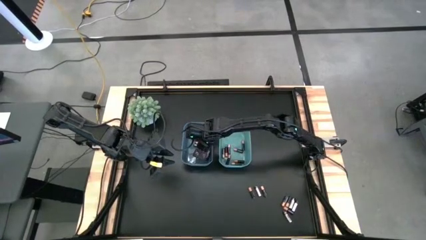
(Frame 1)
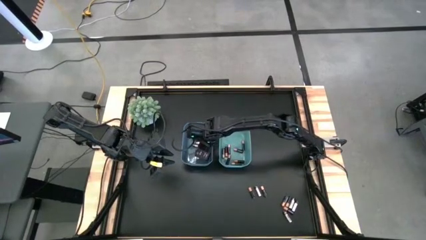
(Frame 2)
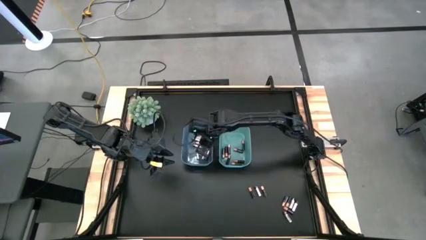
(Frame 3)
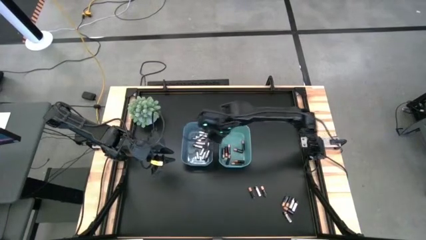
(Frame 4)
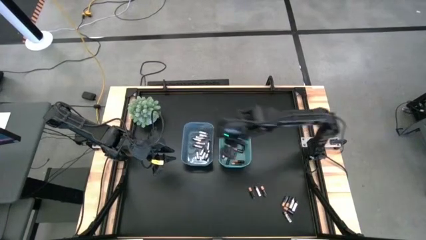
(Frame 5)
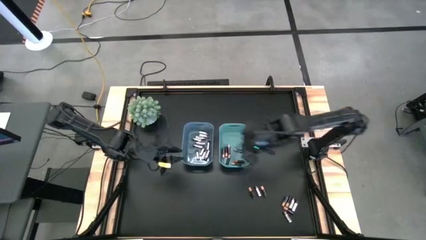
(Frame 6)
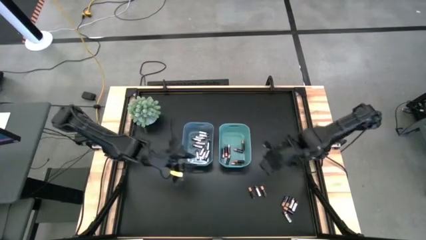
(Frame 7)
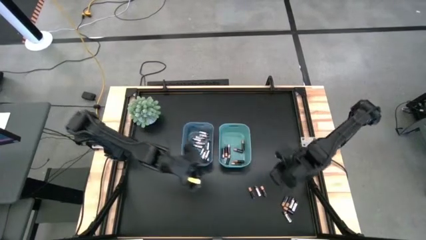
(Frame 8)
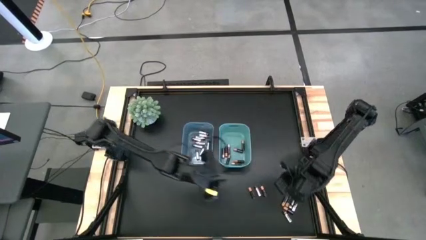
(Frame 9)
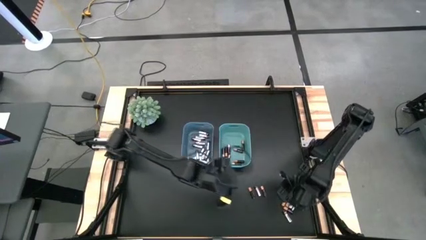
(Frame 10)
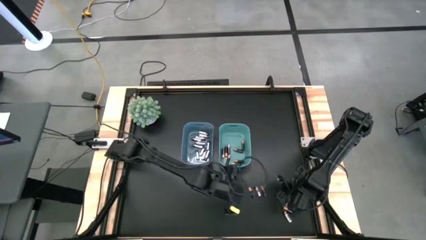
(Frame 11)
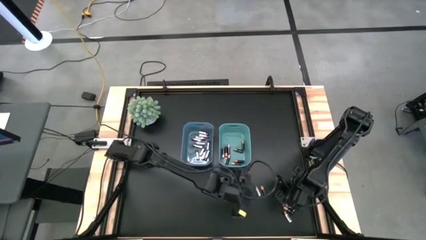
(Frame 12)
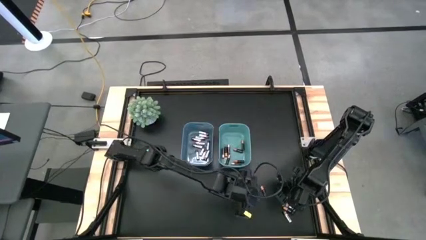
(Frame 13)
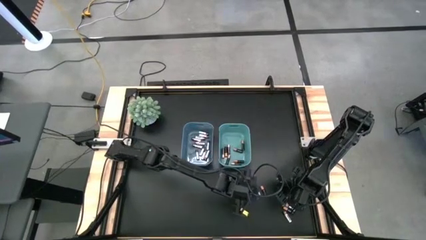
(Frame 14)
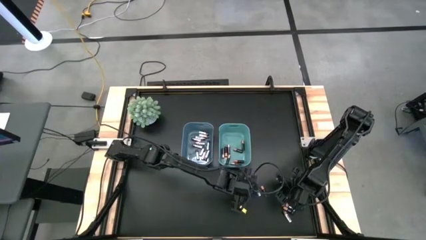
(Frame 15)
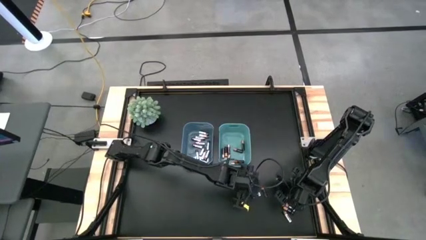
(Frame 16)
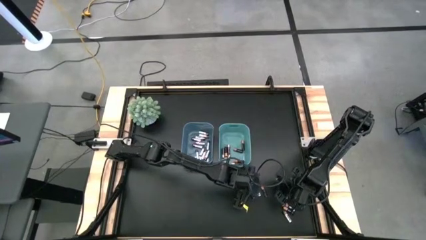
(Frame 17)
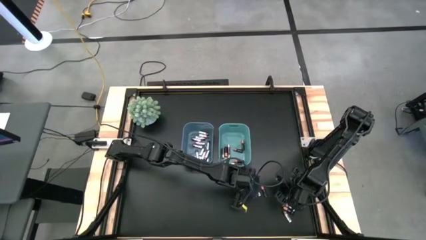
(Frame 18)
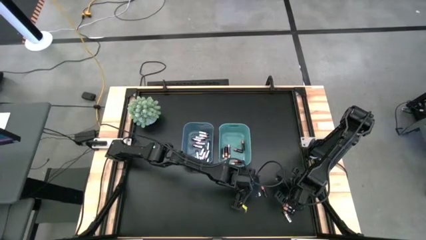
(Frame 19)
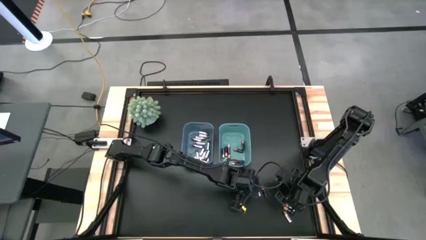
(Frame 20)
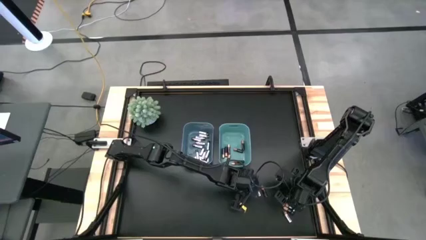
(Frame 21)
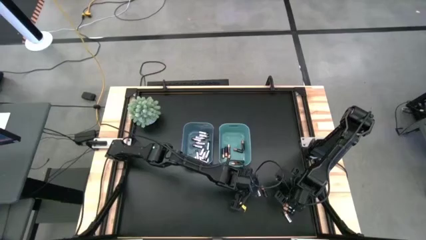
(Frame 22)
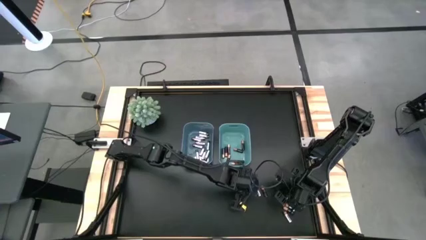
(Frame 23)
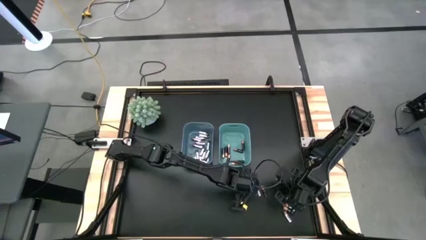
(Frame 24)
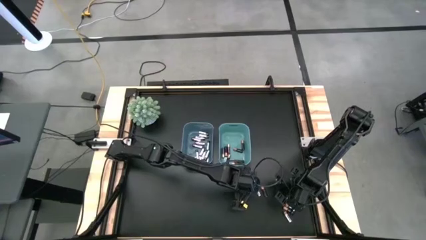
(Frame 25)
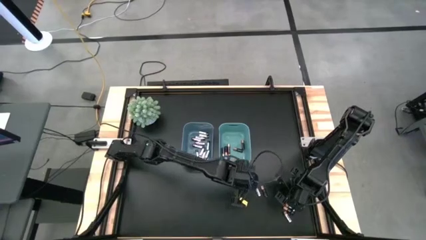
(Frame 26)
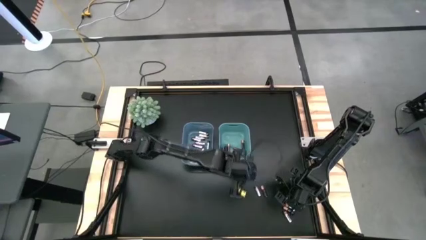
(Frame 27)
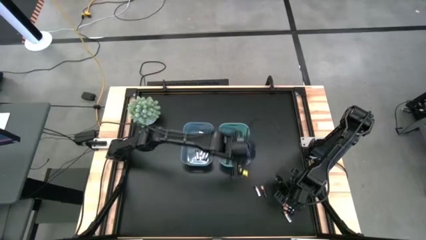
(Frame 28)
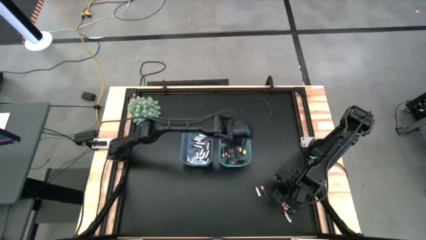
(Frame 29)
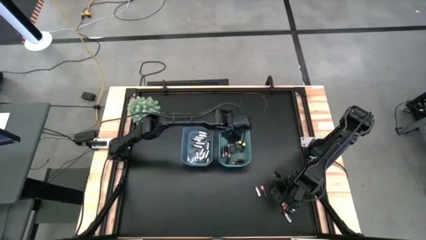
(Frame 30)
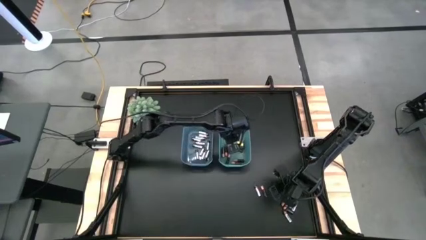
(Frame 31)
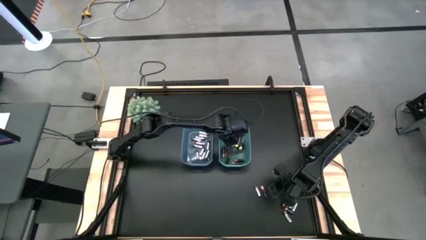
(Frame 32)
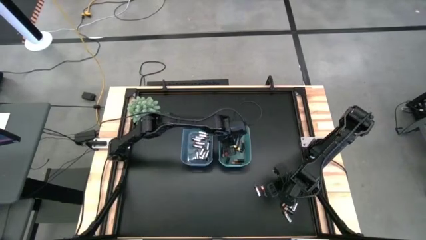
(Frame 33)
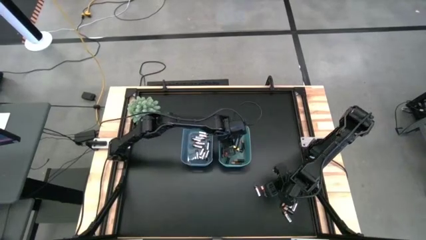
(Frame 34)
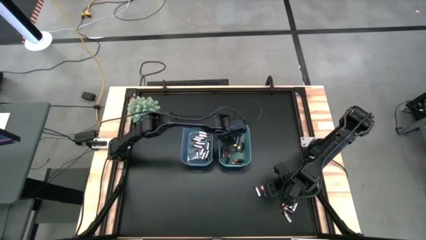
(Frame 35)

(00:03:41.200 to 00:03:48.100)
Task: Sort batteries
Put the black battery into the green bin

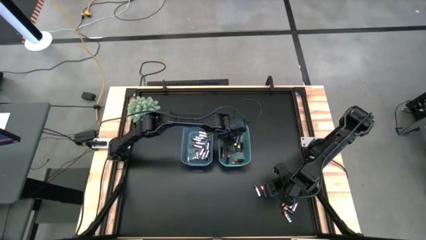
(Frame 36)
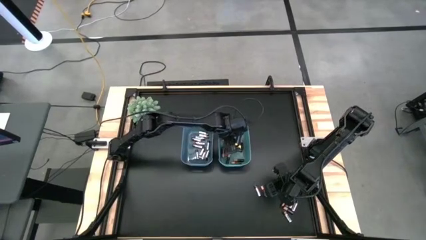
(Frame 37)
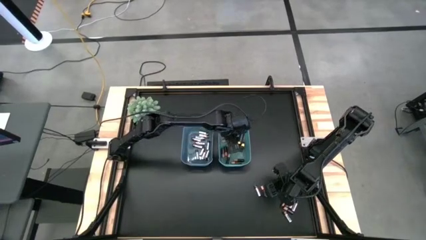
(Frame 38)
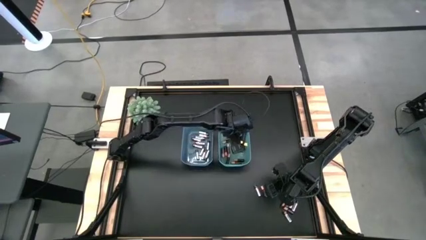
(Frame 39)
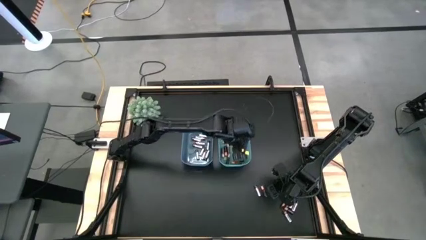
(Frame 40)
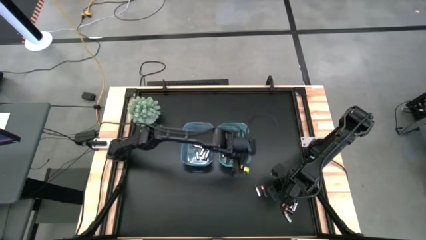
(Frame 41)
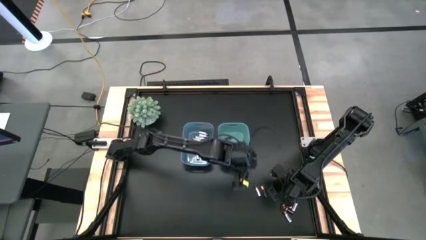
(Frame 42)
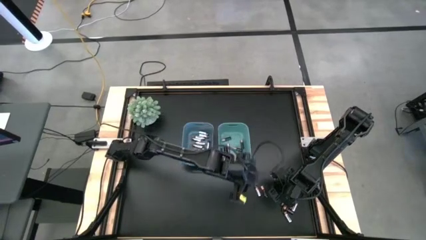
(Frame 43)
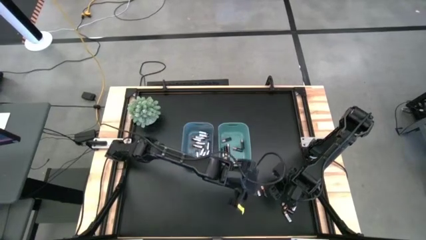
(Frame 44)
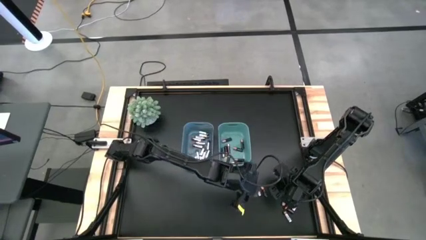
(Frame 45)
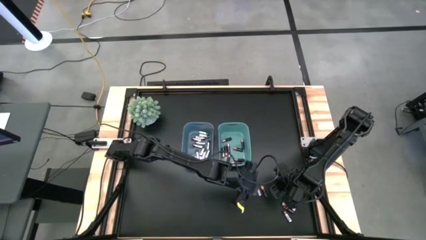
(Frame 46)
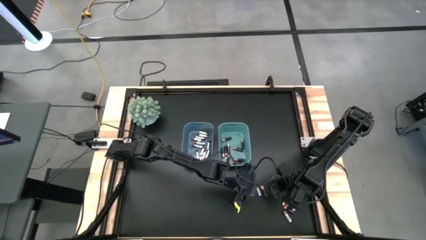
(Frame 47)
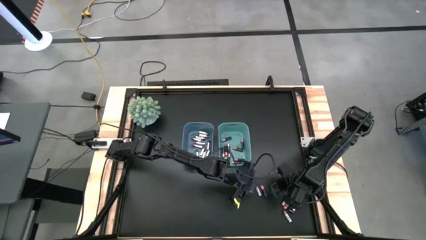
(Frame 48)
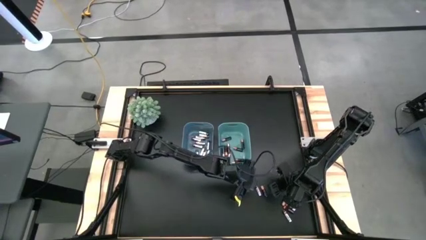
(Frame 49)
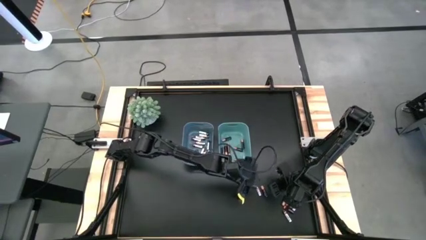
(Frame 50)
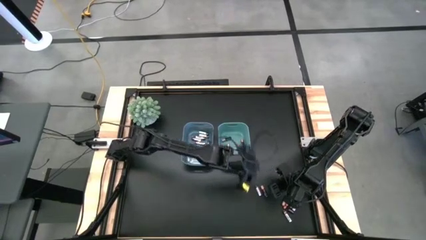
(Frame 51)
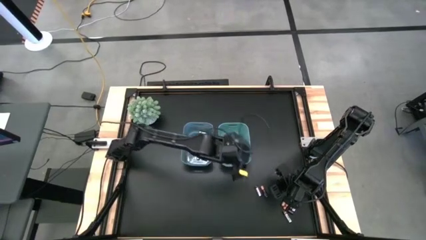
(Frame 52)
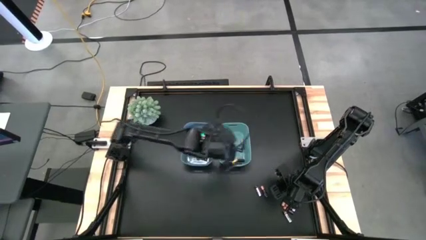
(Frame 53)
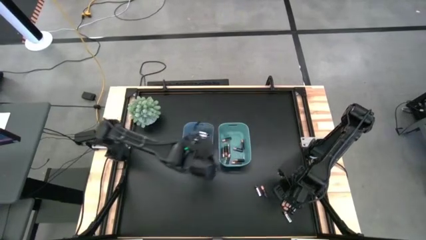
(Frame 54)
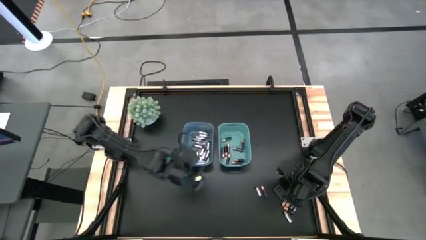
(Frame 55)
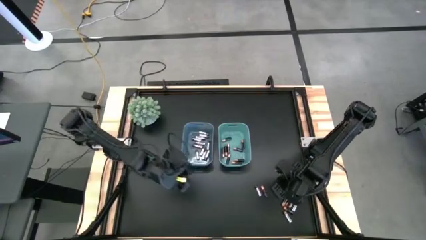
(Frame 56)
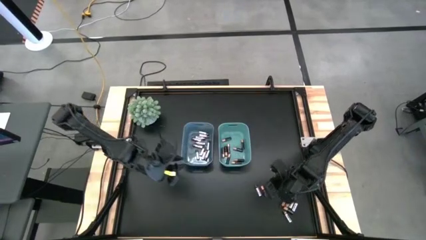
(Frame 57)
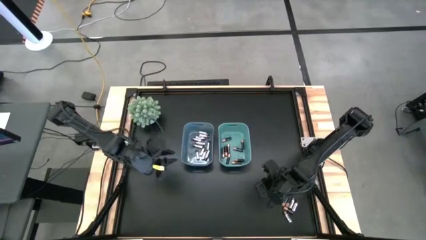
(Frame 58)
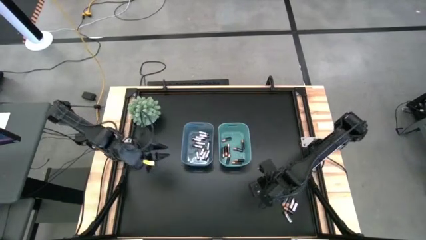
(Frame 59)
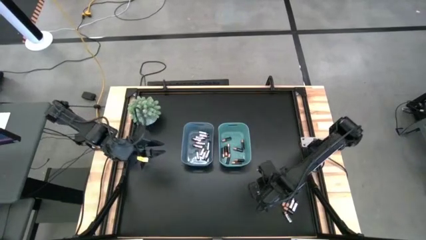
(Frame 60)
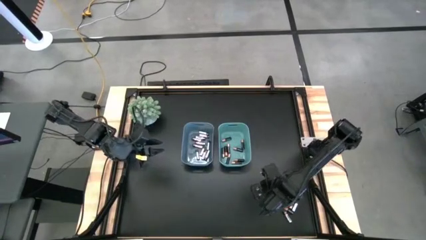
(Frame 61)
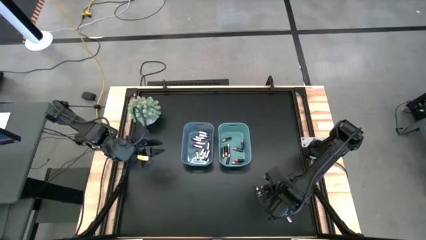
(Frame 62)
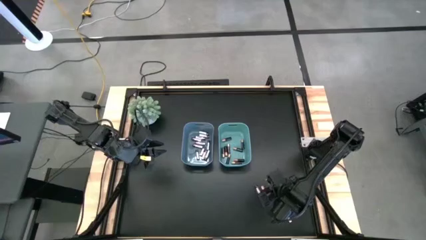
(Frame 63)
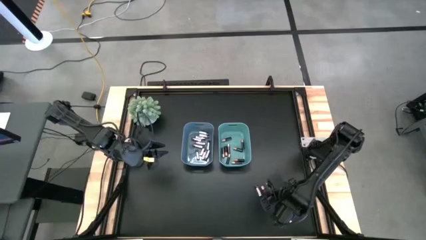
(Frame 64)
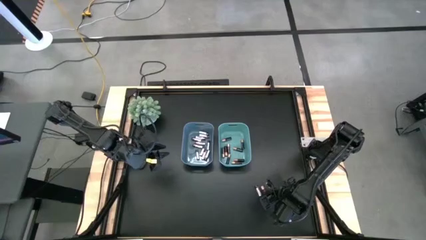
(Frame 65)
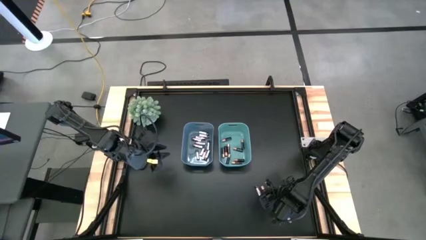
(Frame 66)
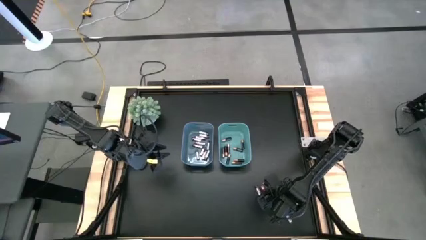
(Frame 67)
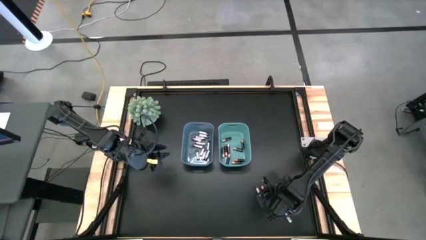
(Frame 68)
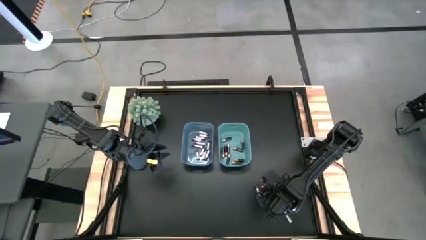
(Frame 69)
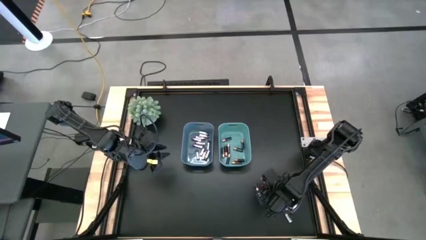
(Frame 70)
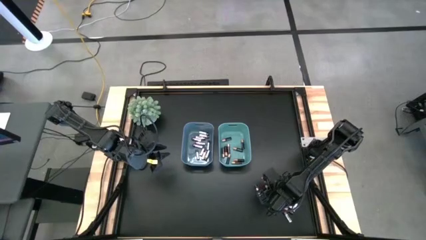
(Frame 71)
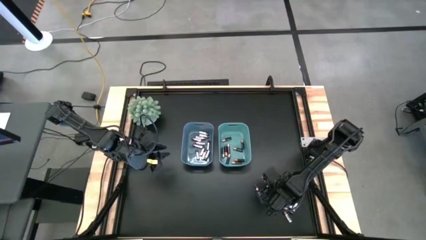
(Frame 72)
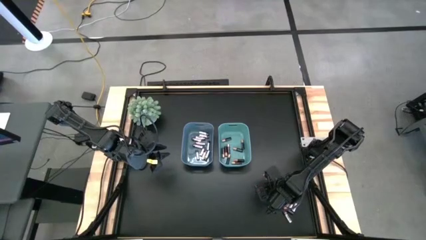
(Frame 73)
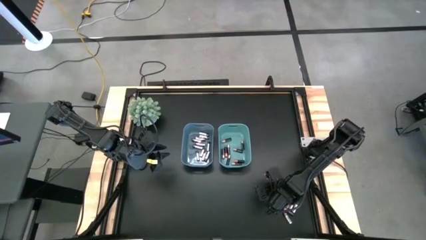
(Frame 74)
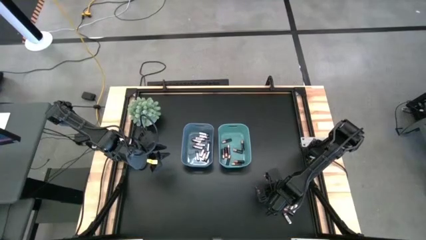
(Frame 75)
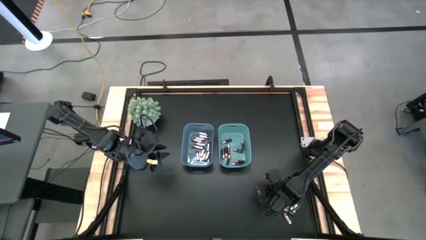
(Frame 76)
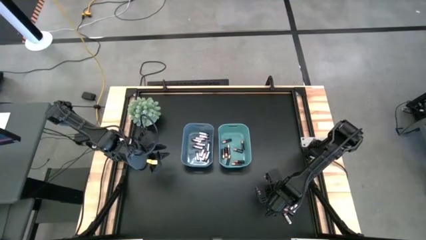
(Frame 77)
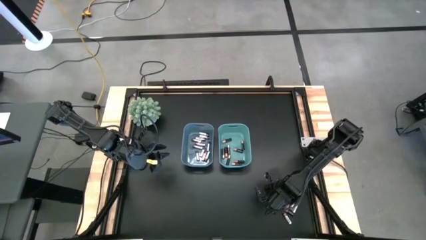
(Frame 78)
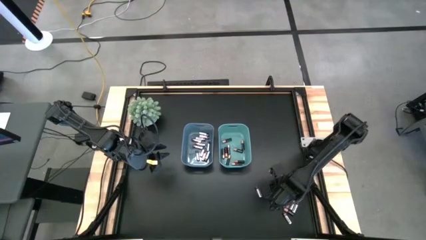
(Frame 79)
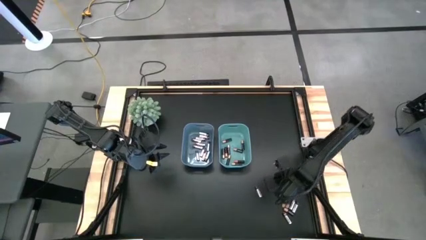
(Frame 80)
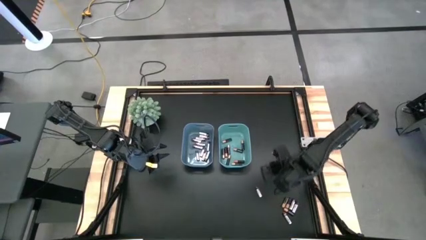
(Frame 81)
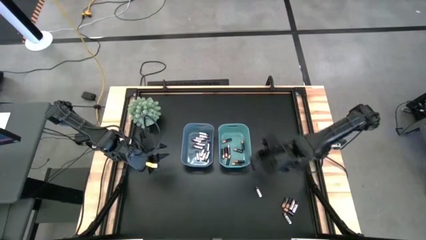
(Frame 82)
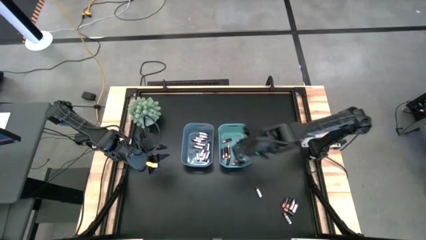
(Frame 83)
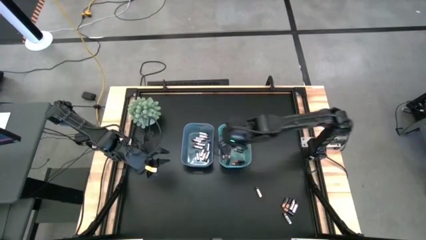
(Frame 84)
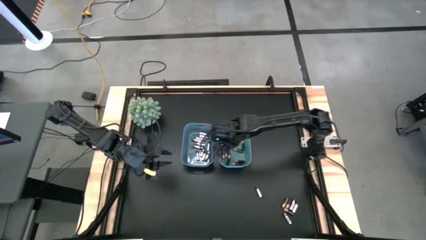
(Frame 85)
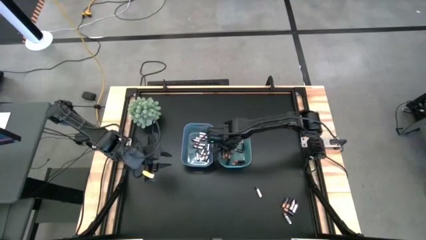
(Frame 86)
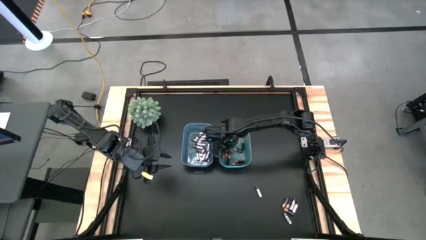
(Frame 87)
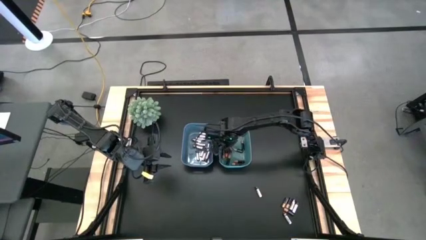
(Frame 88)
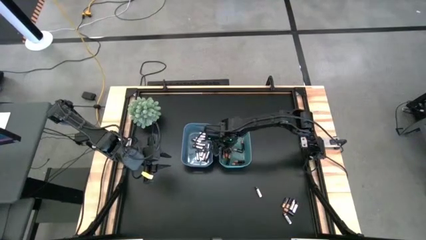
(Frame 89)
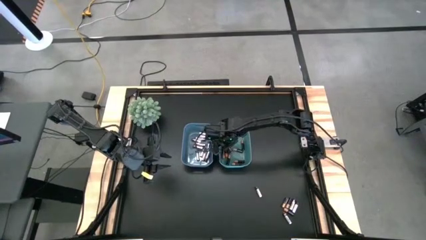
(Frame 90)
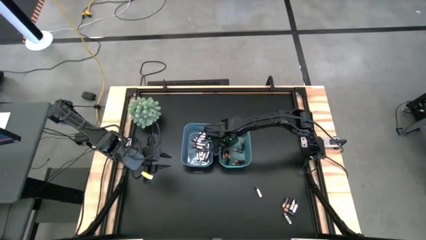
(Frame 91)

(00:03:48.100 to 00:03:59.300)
Put the black battery into the green bin
